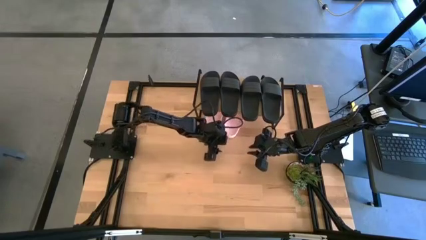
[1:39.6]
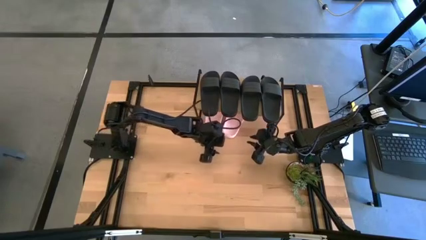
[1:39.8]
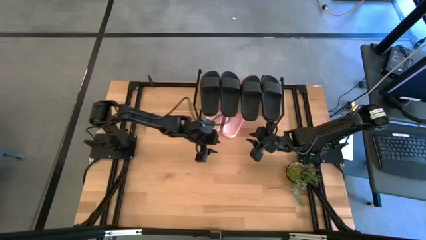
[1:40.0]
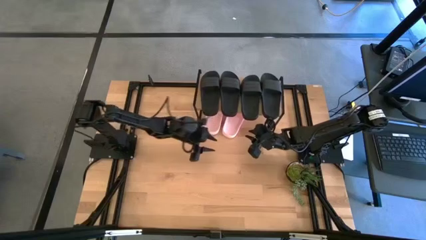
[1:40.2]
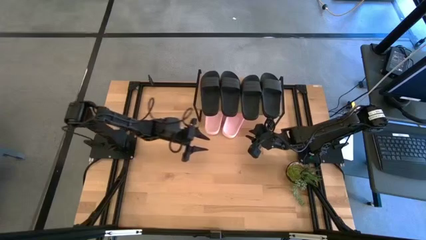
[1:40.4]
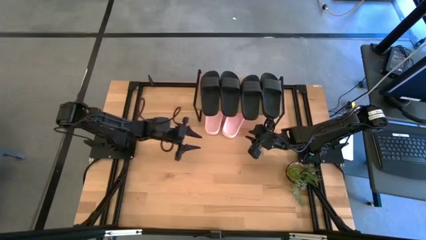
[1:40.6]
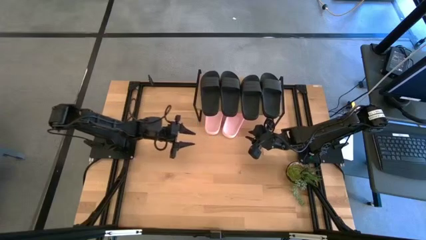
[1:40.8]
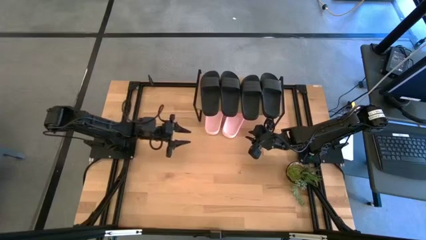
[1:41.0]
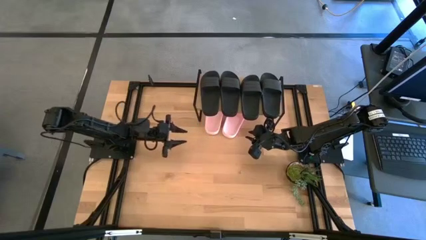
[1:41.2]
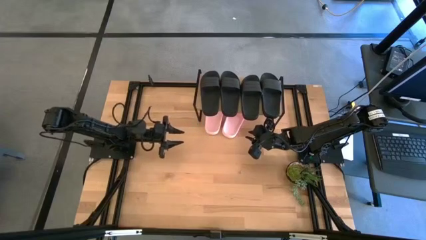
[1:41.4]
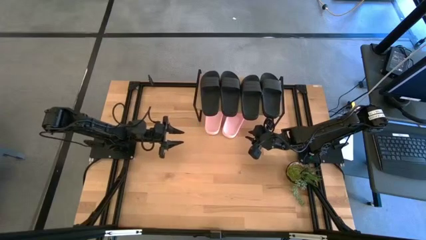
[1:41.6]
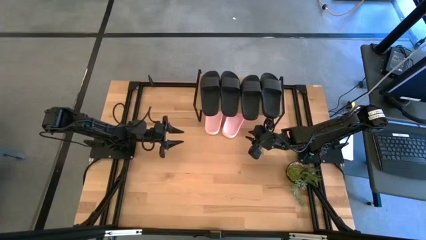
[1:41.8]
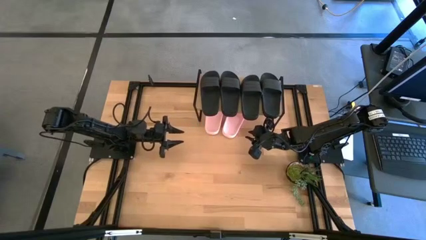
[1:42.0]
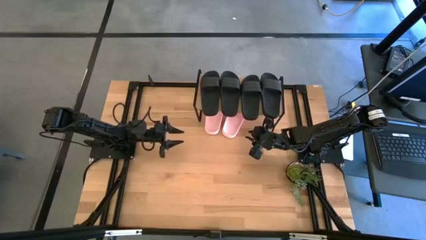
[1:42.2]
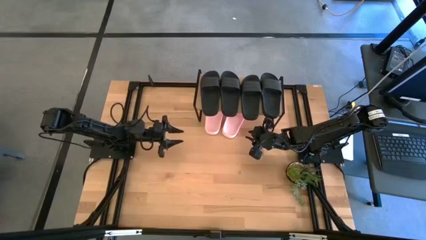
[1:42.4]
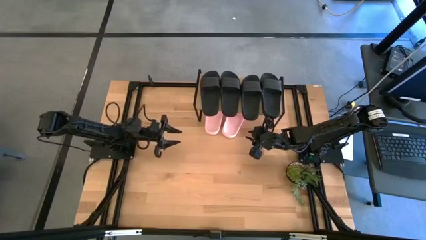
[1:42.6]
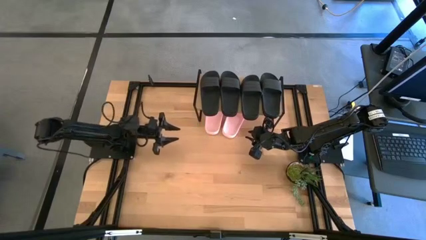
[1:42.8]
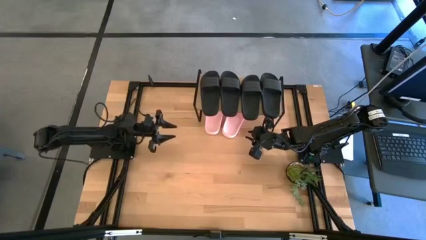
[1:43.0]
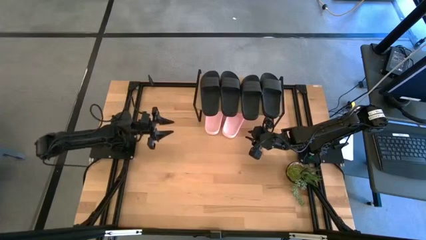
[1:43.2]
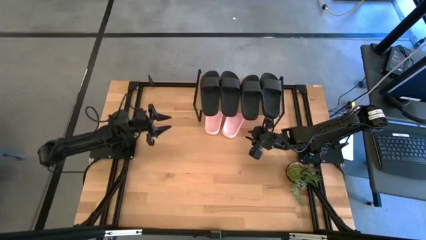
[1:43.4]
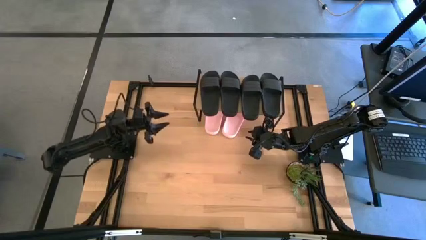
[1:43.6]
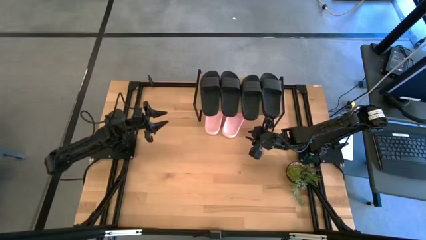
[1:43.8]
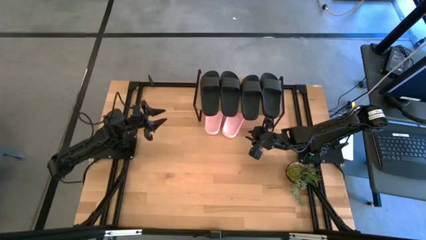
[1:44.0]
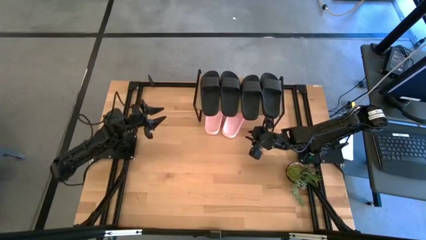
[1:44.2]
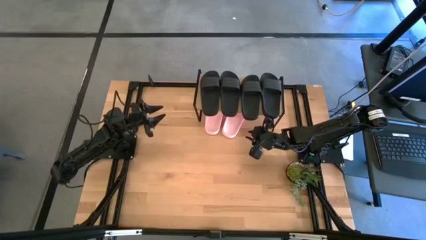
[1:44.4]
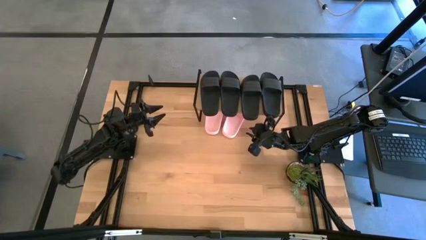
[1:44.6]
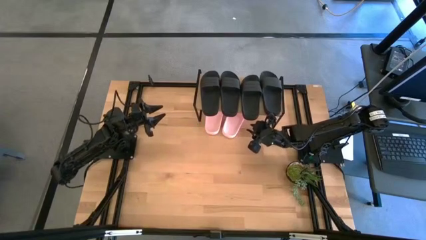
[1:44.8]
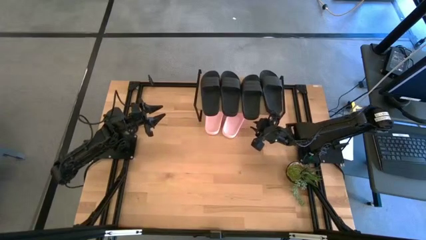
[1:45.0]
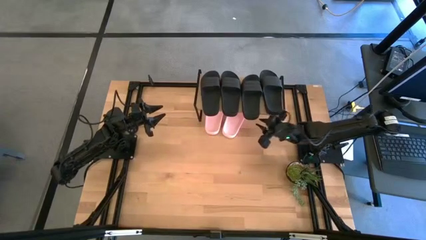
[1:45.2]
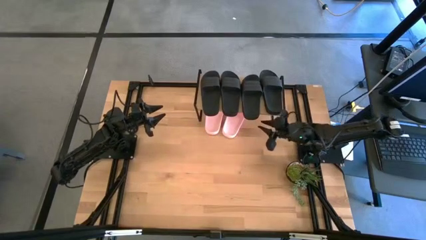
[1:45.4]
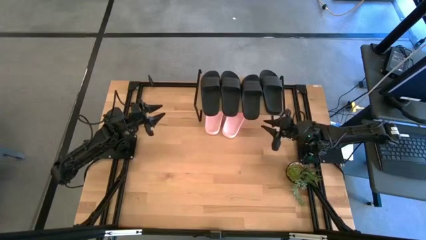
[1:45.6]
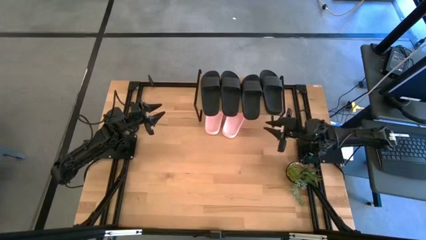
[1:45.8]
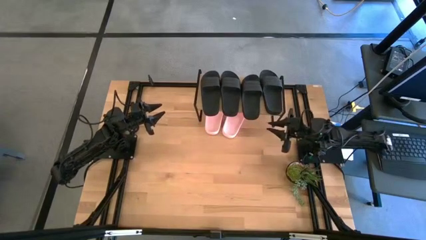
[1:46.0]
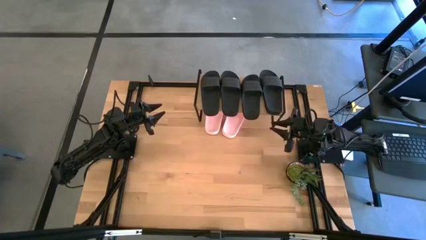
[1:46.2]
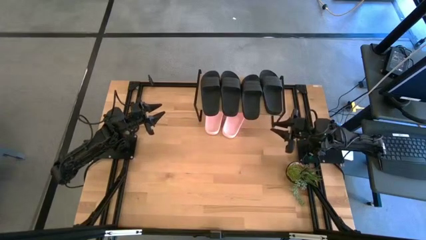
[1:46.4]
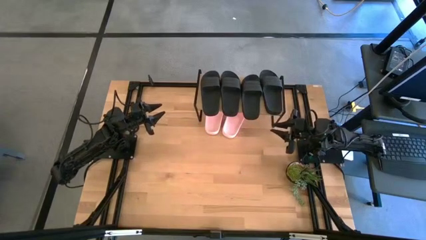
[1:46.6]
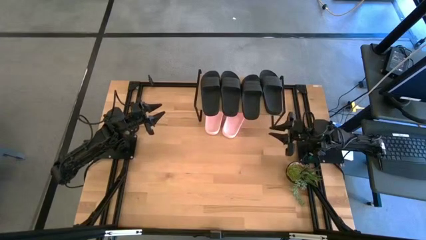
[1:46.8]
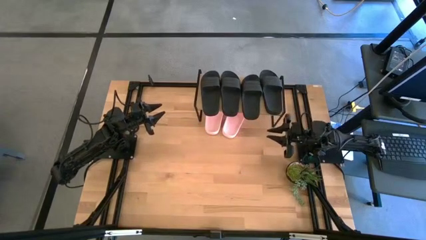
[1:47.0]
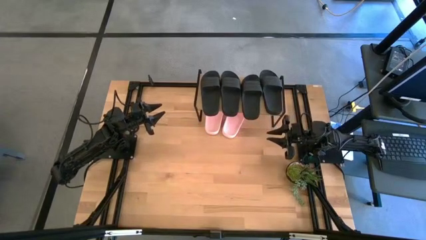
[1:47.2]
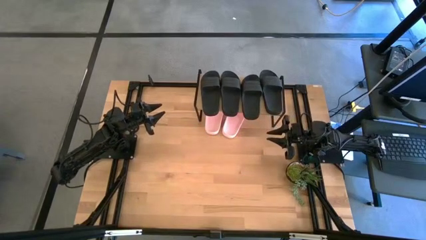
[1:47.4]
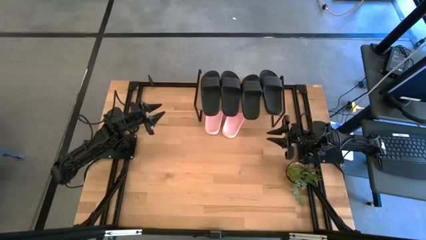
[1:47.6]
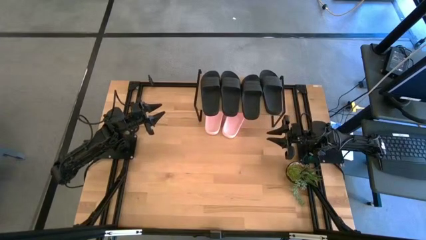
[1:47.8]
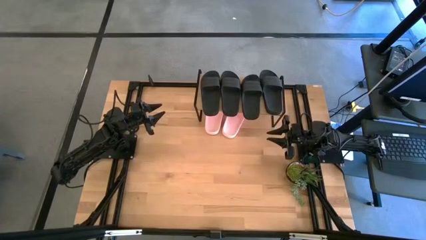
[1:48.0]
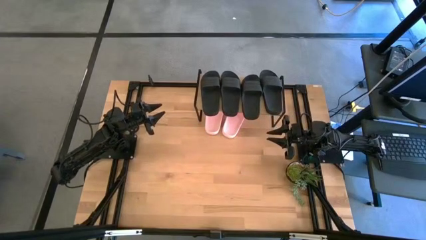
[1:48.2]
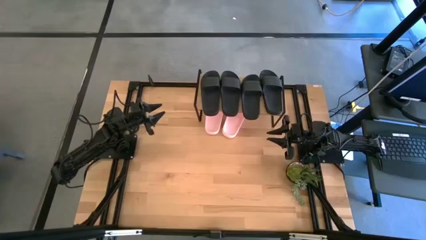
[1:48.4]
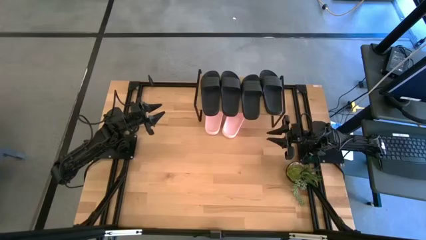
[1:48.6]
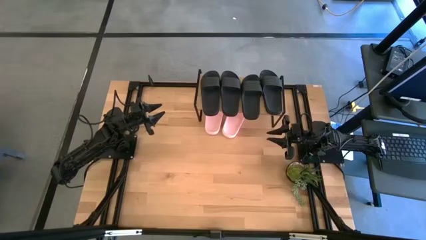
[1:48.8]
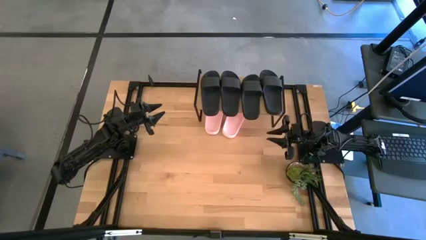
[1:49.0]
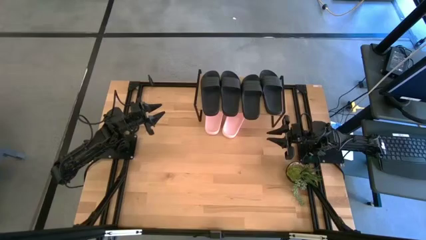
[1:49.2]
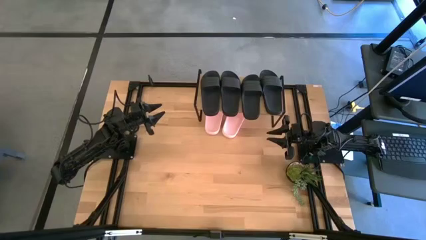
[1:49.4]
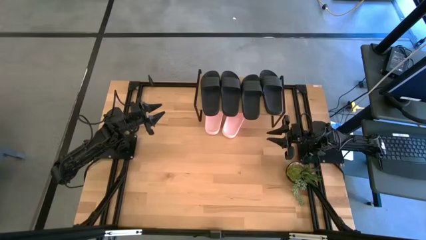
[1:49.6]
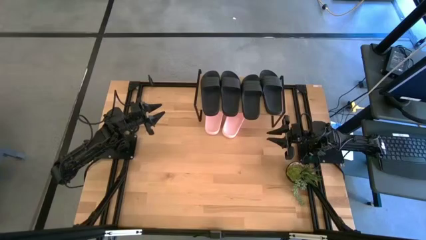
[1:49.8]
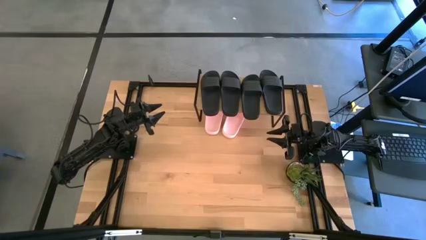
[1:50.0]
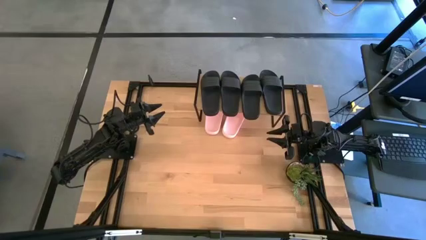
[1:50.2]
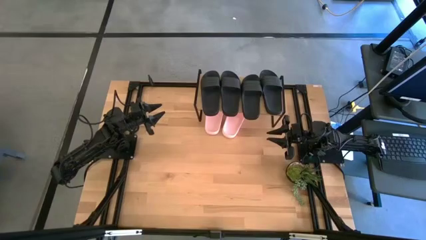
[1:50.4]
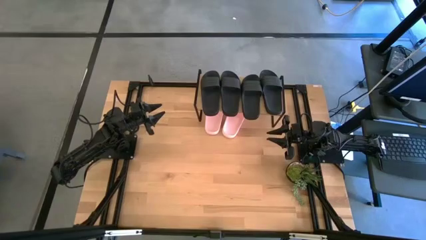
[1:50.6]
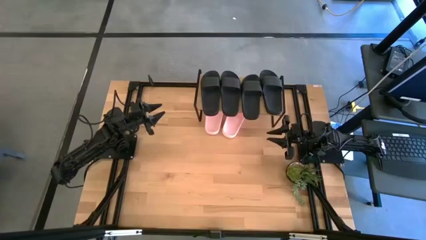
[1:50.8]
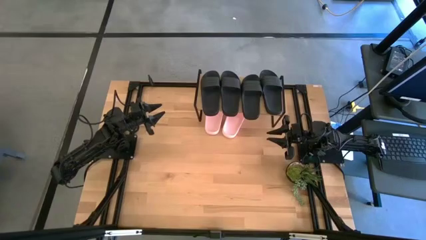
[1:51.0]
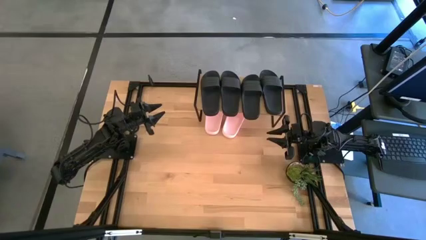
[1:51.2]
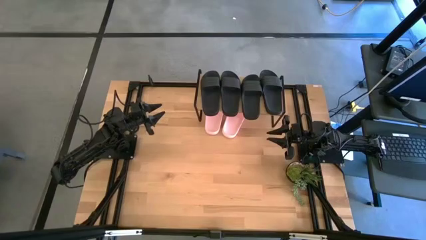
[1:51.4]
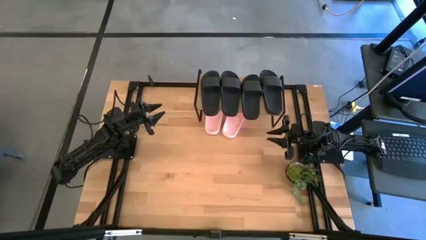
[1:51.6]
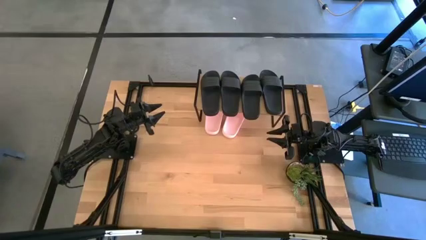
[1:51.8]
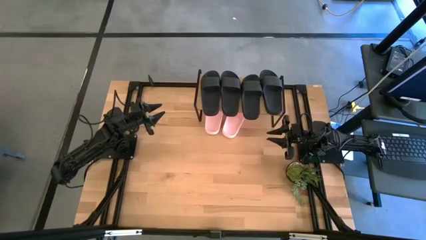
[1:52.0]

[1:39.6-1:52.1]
Task: Pick and place slides into the shelf
Return to Home Position
